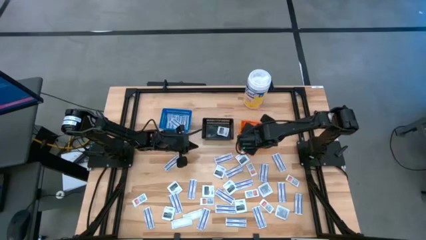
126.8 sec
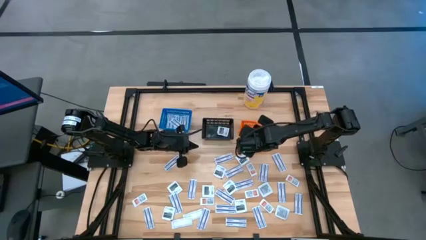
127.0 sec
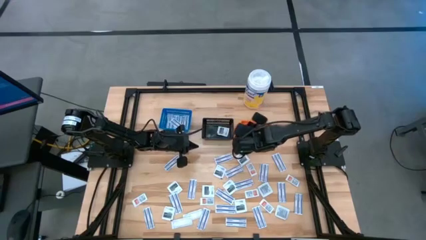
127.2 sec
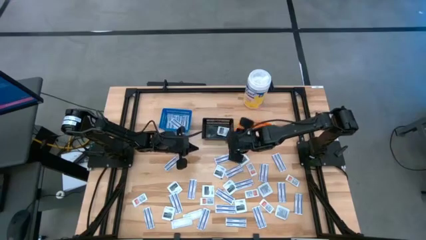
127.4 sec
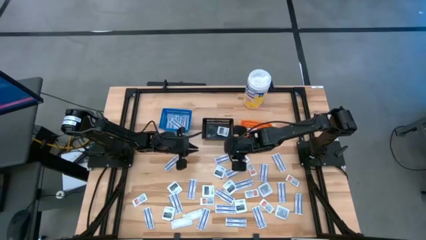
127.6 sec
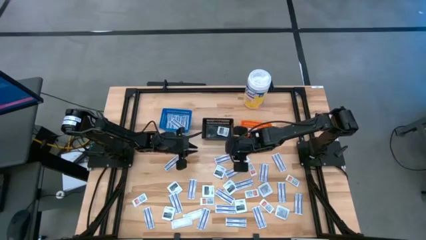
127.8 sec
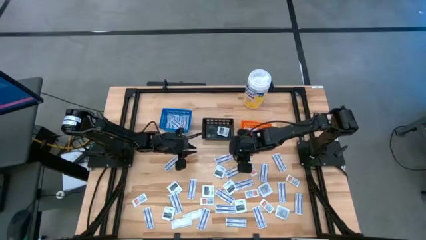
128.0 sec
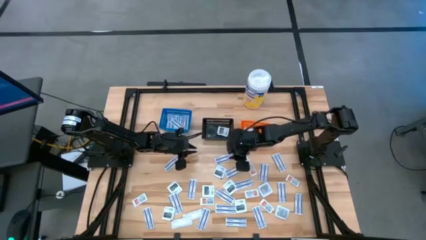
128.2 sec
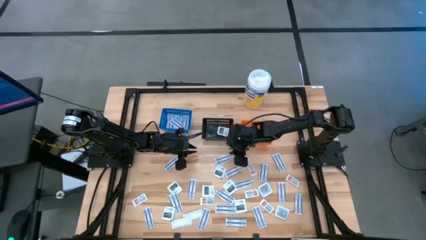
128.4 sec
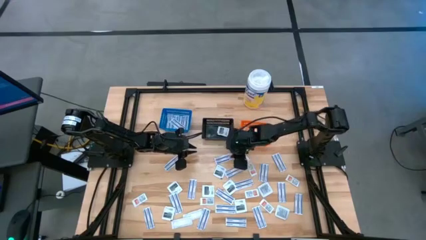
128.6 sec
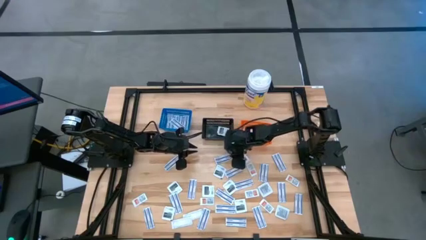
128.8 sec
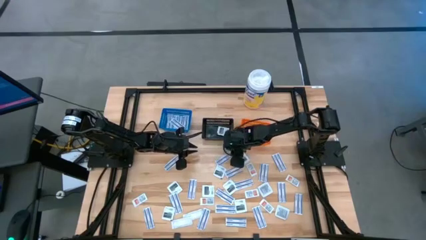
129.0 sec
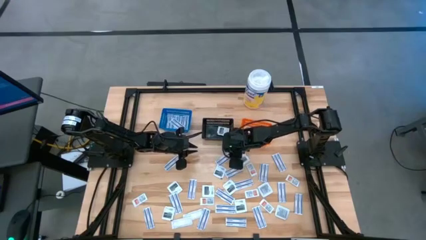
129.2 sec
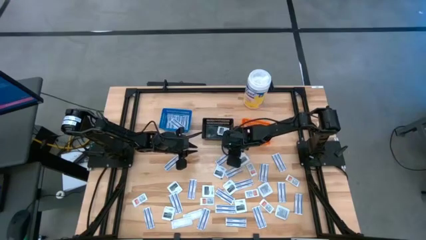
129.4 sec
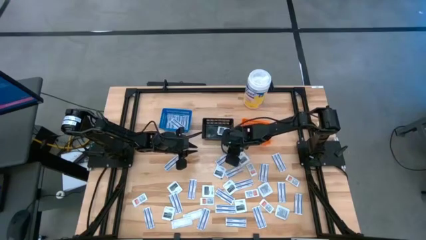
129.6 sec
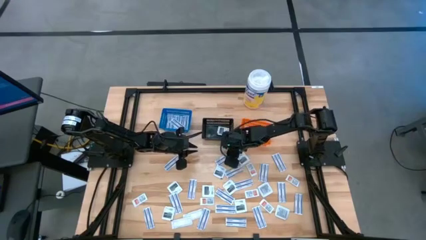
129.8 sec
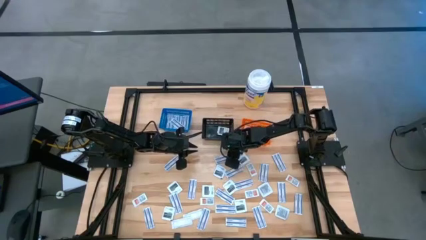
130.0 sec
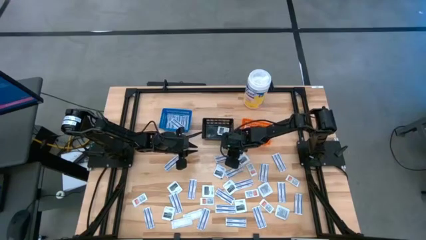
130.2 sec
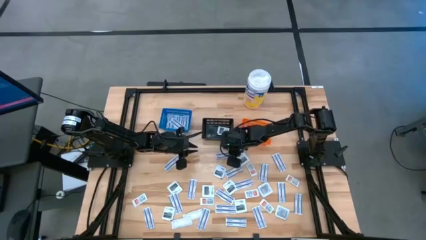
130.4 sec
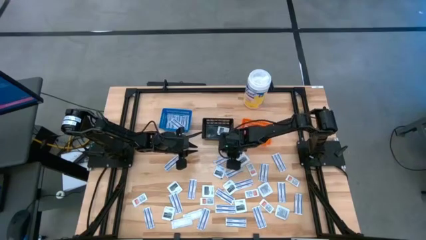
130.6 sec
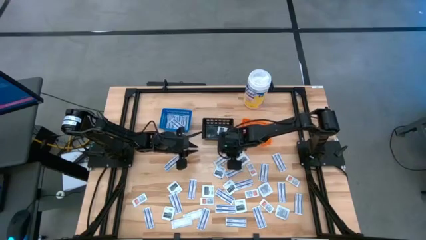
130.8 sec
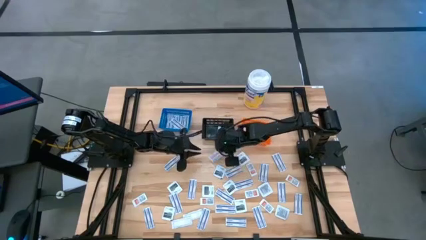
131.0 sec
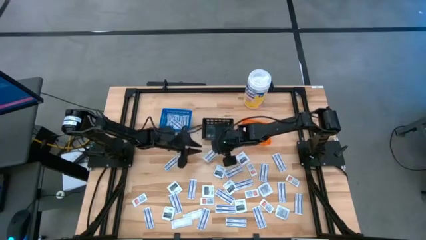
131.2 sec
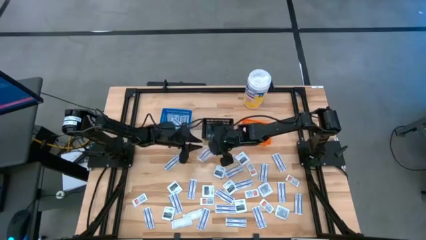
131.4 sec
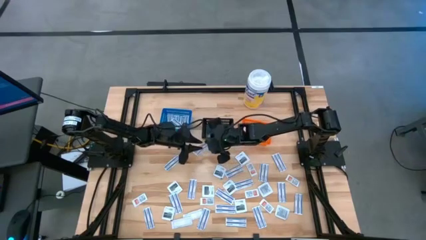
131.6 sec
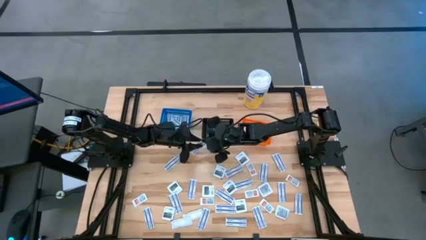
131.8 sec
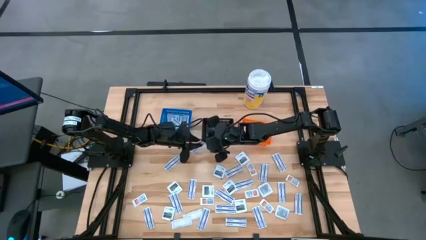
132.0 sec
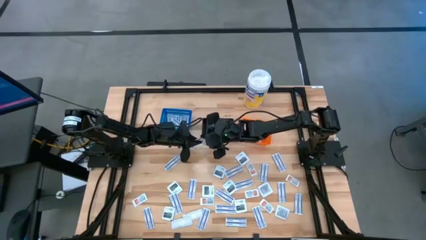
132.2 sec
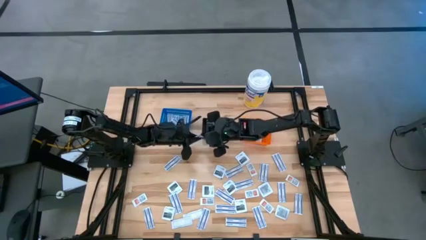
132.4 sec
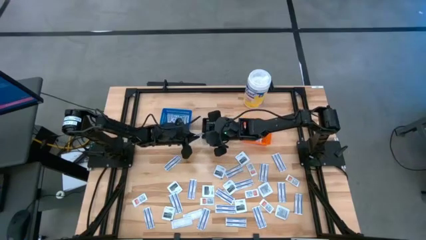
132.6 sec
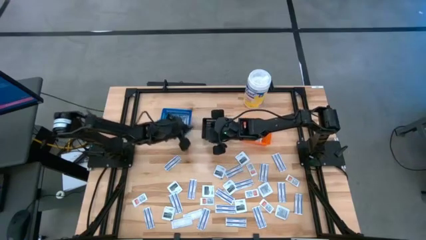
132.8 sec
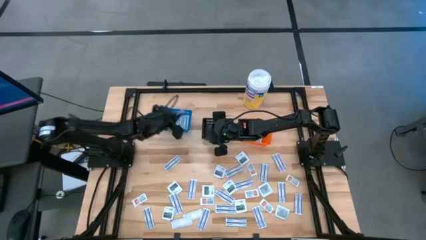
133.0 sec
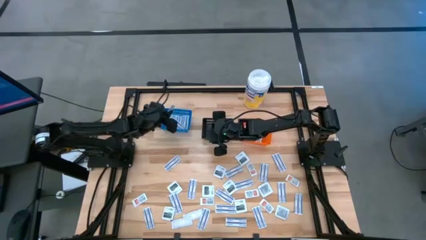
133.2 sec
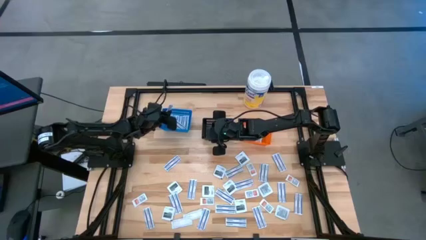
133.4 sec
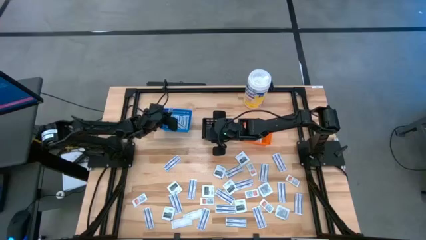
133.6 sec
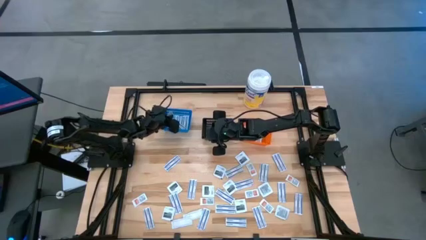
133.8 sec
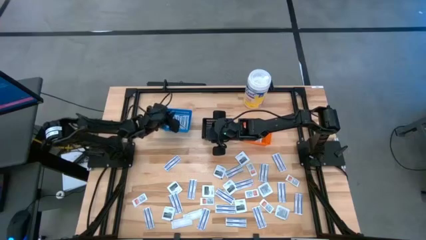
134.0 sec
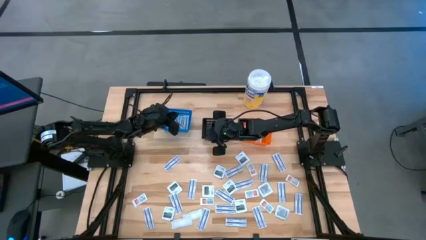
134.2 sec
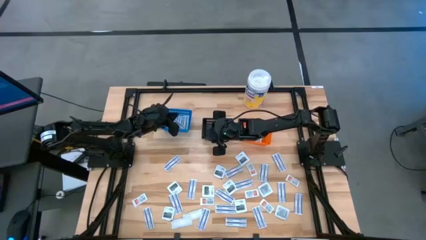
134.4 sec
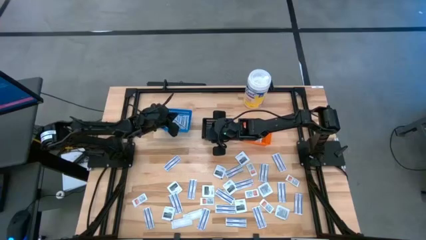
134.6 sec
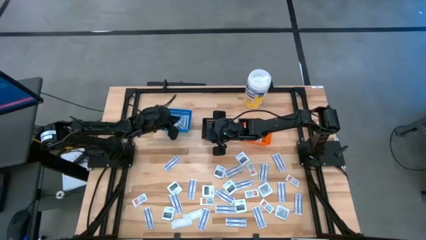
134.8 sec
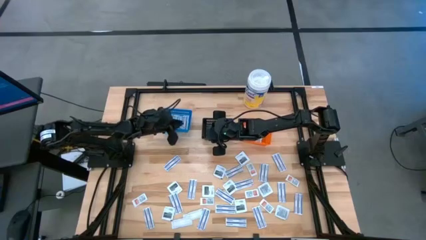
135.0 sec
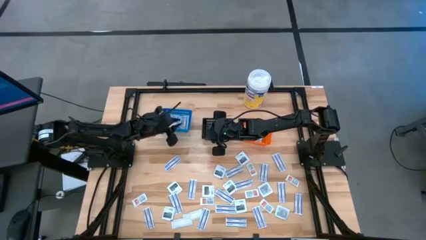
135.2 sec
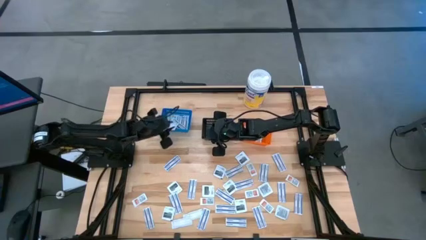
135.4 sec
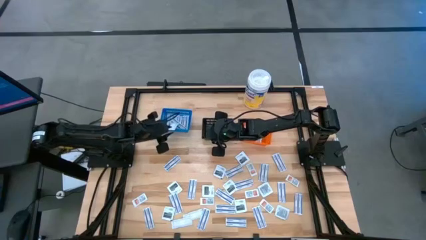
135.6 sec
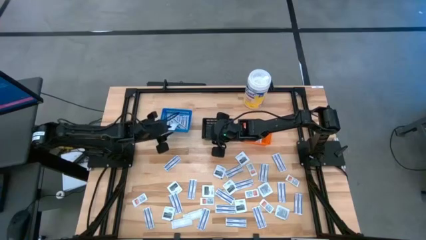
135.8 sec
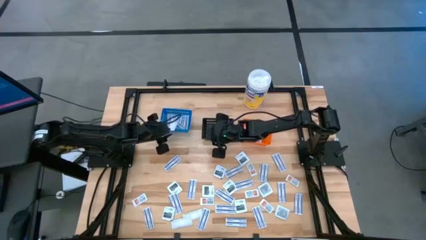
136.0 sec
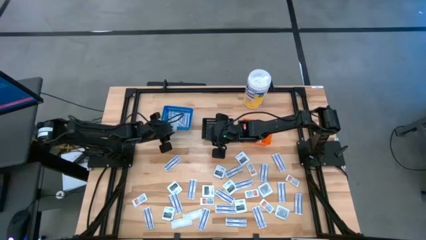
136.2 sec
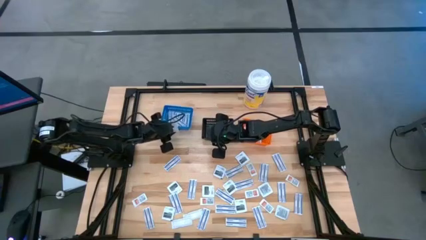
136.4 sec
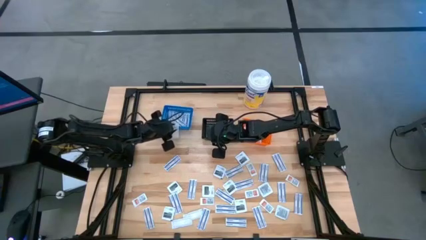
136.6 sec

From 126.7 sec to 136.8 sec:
Task: Pick & Place First Aid Supplies
Put the bandage into the blue container

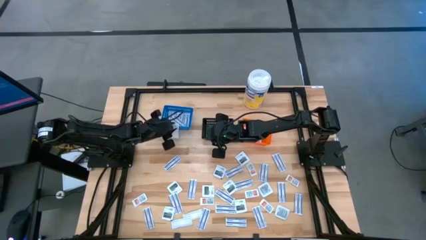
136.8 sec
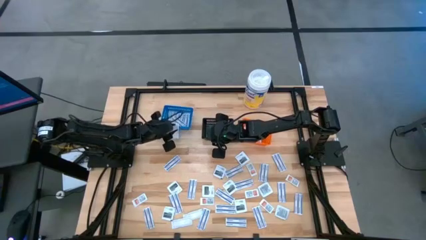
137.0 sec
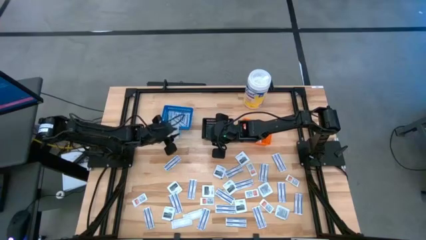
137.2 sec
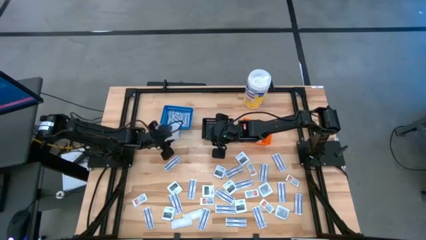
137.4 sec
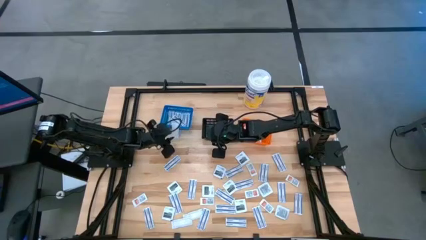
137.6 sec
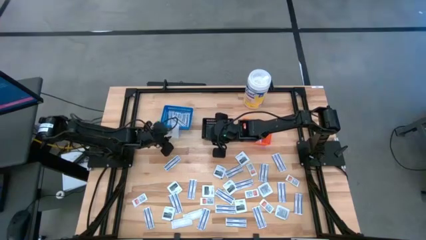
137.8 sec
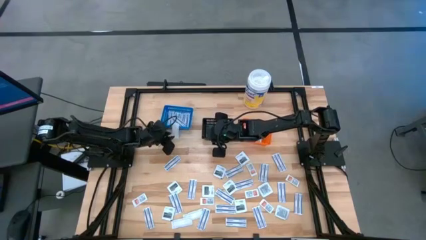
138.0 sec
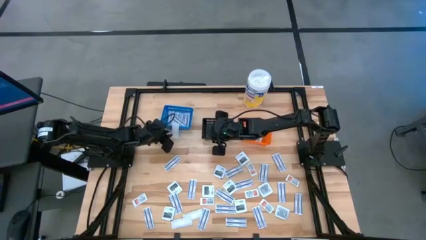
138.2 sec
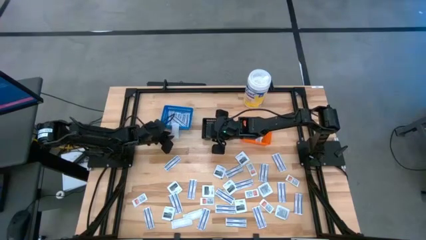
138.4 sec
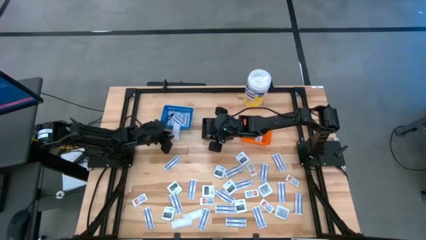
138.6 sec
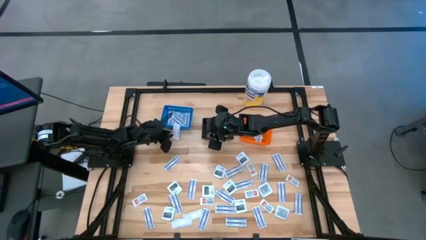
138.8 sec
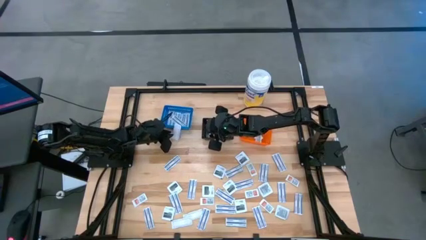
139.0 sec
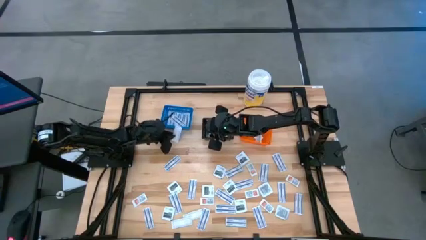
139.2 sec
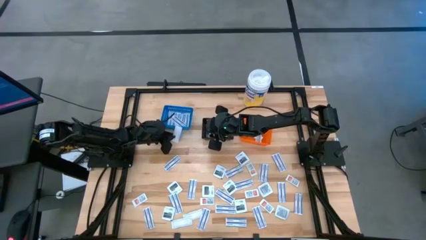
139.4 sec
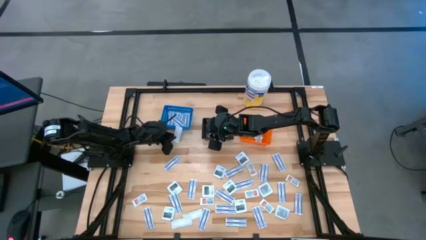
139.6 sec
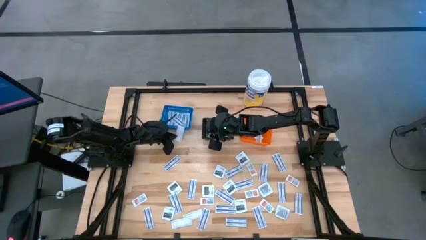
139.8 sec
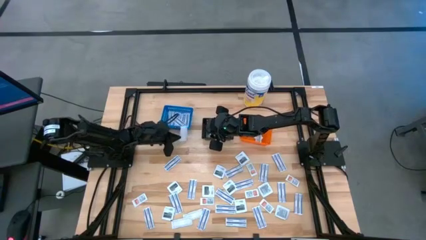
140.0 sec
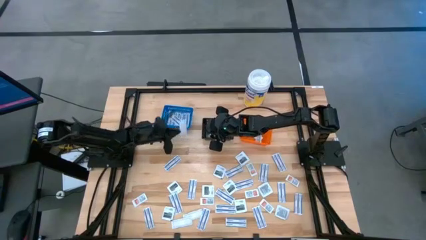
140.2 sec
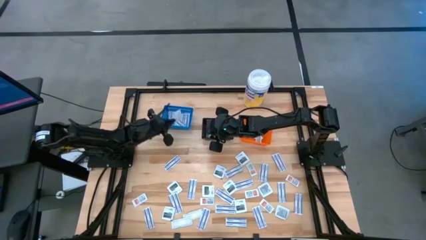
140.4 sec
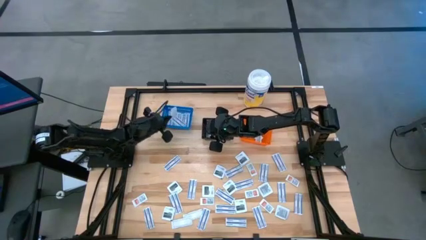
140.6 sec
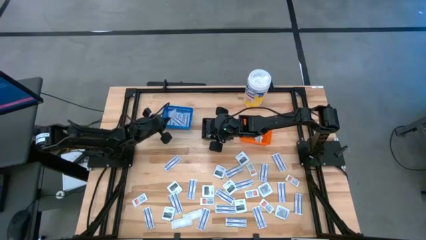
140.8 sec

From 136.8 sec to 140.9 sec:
Put the bandage into the blue container

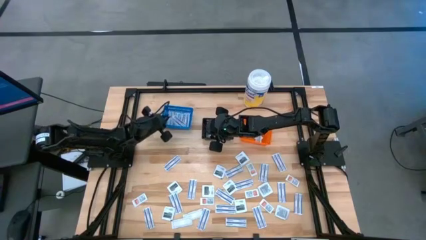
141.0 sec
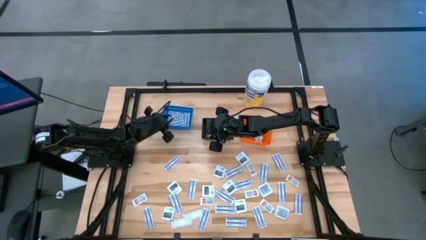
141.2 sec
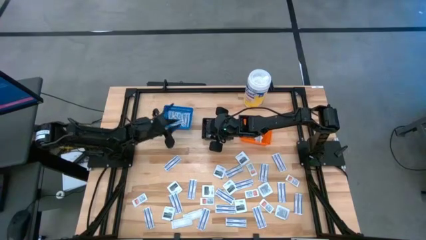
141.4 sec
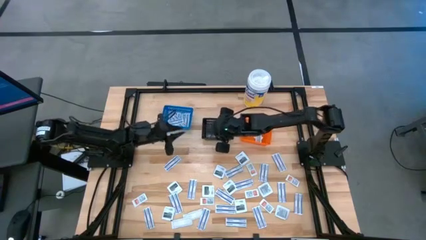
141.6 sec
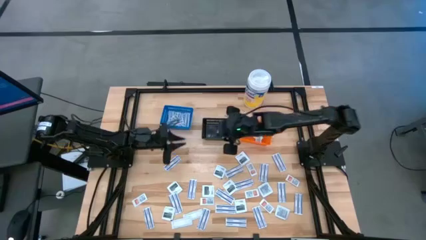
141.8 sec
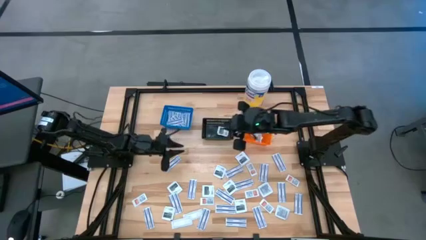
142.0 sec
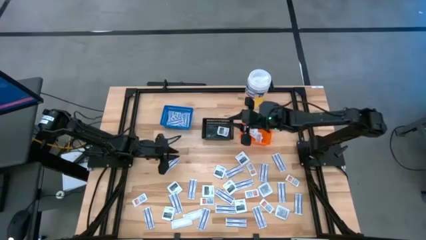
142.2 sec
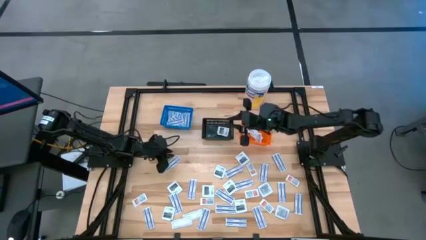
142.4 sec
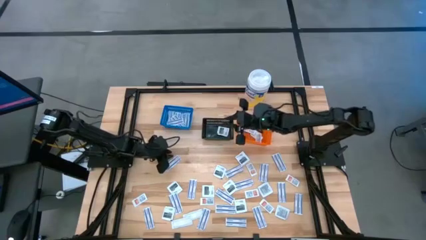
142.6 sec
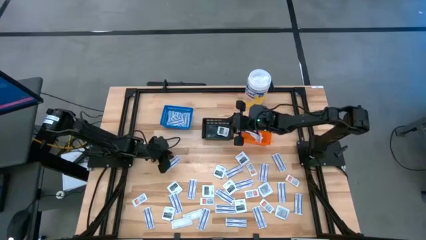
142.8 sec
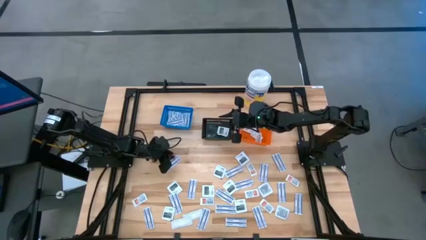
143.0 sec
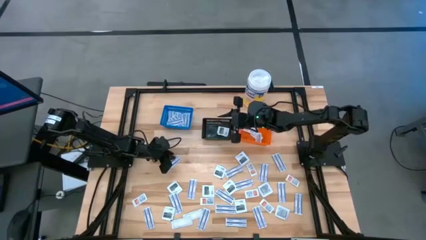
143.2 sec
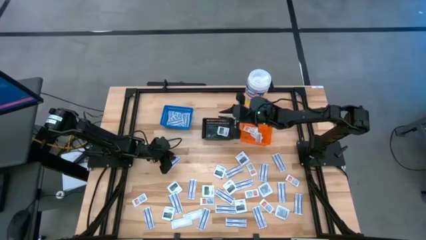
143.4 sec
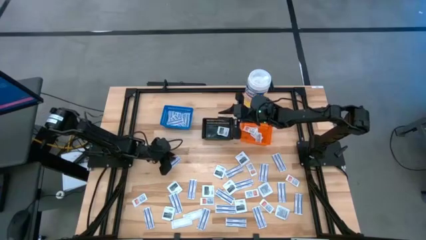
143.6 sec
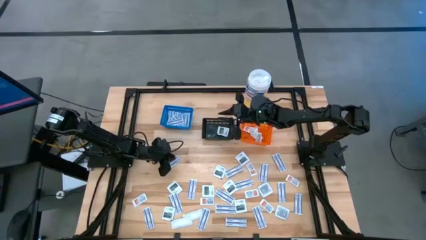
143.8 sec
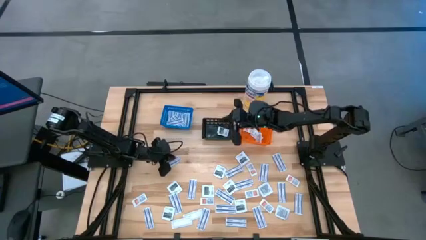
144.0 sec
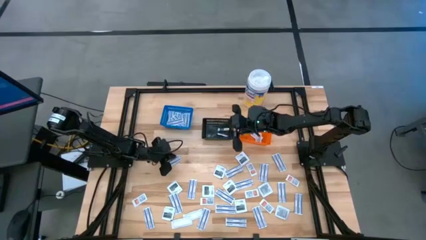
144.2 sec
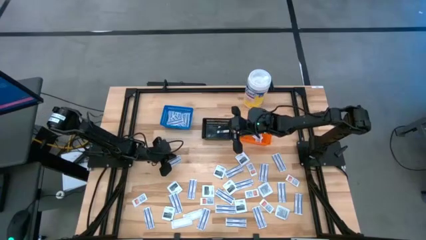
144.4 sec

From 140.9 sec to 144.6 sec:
Put the bandage into the blue container
